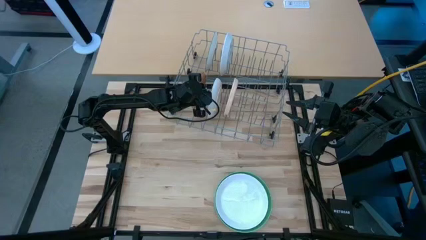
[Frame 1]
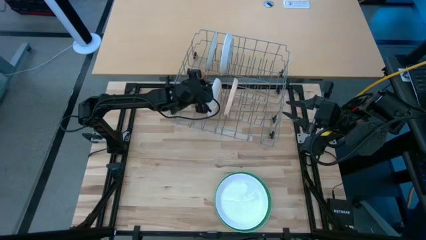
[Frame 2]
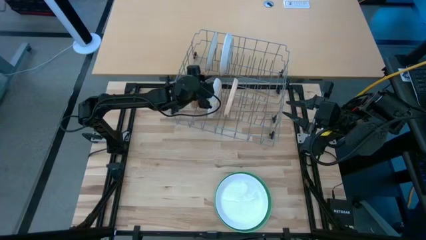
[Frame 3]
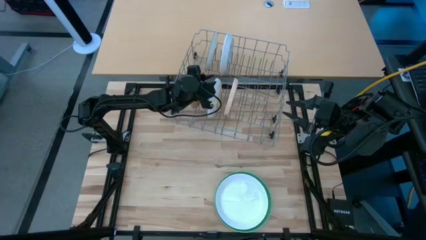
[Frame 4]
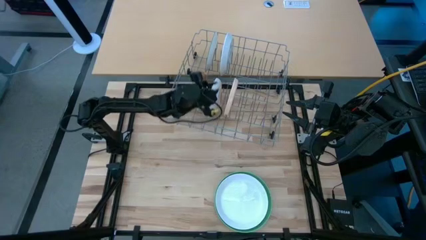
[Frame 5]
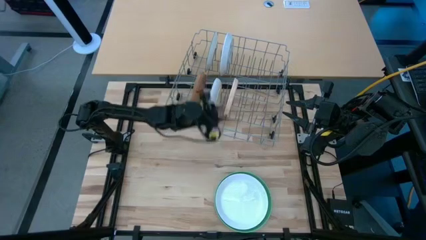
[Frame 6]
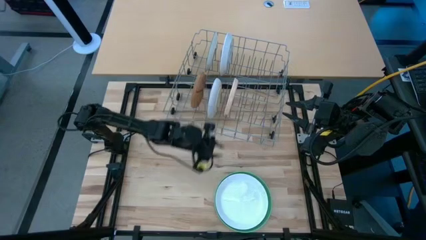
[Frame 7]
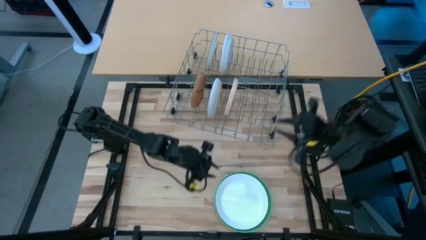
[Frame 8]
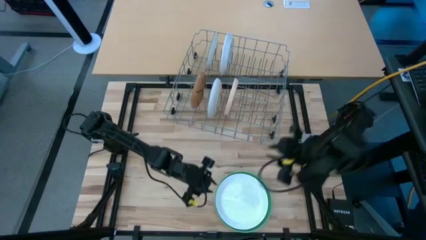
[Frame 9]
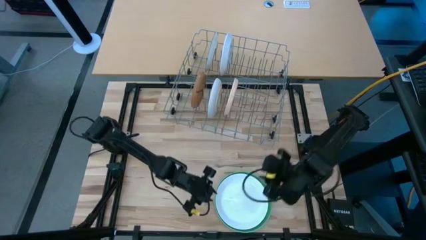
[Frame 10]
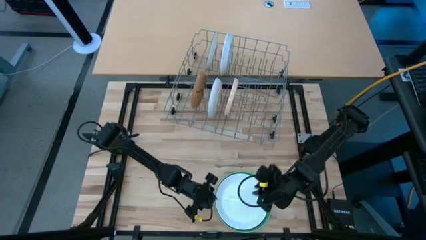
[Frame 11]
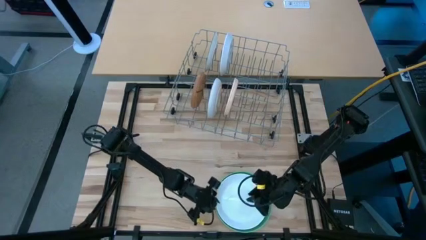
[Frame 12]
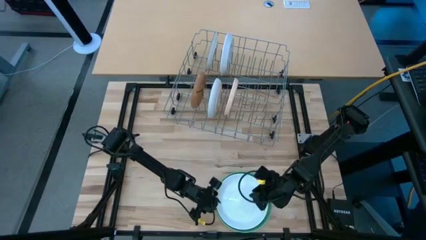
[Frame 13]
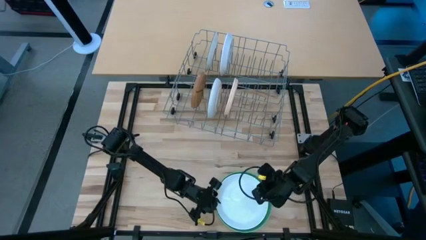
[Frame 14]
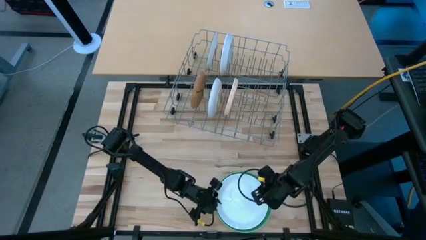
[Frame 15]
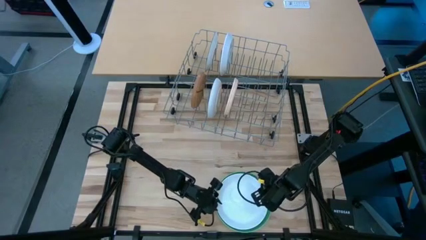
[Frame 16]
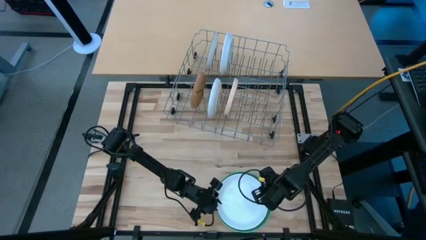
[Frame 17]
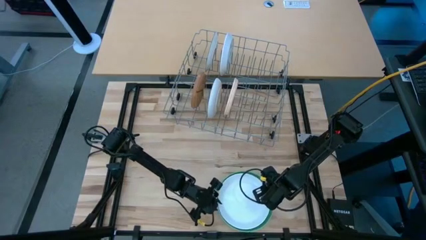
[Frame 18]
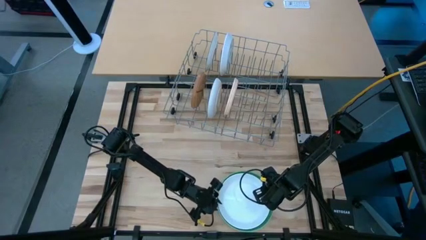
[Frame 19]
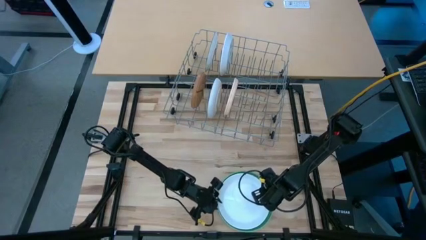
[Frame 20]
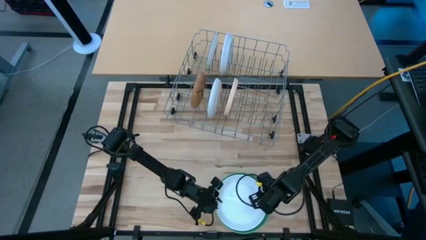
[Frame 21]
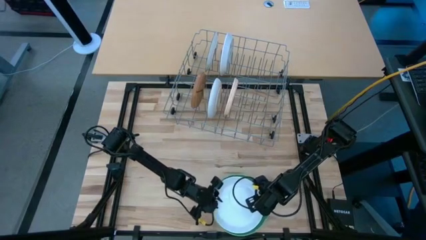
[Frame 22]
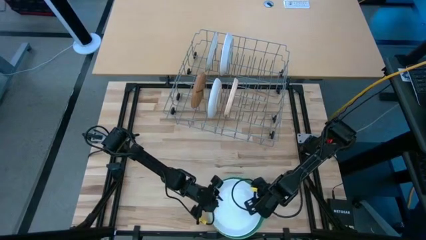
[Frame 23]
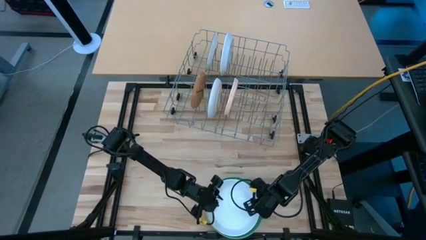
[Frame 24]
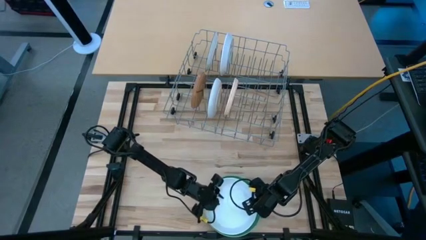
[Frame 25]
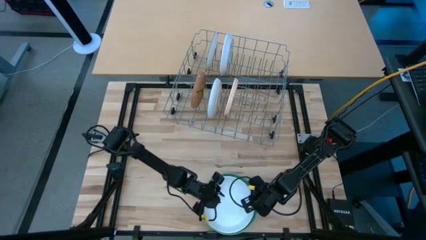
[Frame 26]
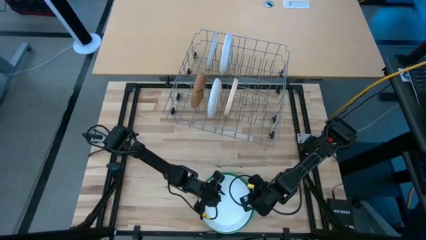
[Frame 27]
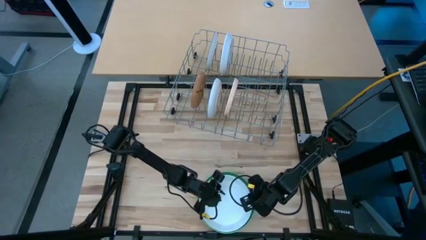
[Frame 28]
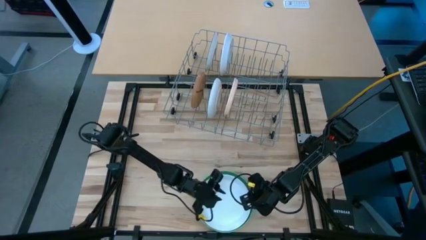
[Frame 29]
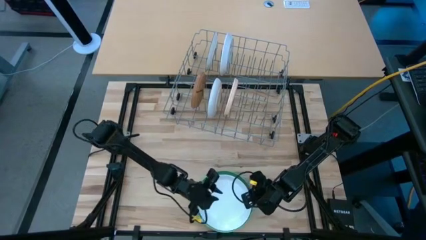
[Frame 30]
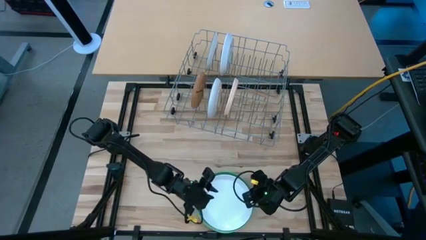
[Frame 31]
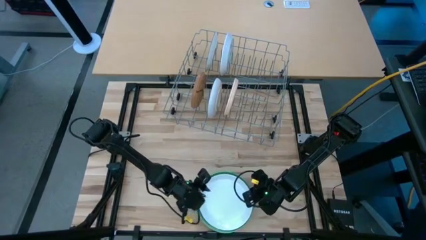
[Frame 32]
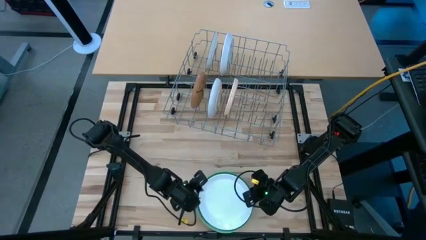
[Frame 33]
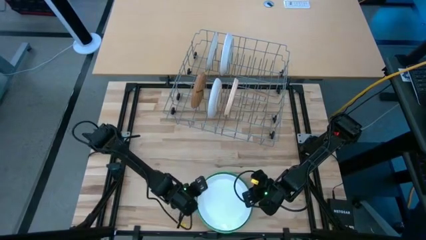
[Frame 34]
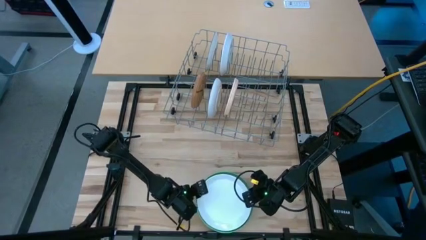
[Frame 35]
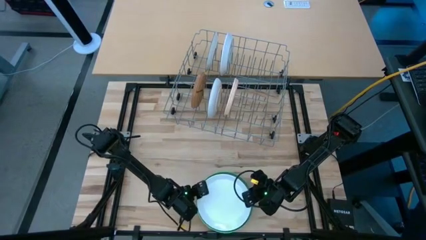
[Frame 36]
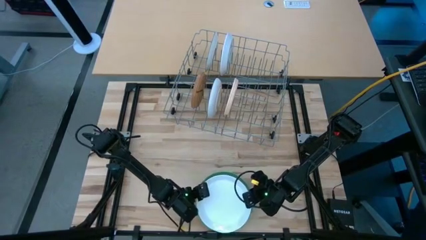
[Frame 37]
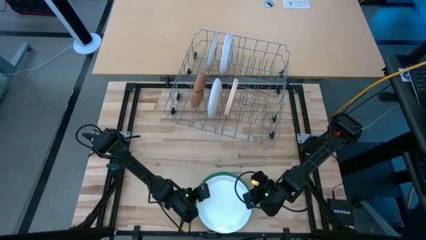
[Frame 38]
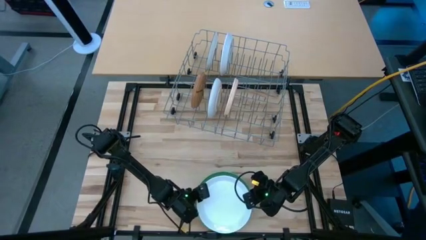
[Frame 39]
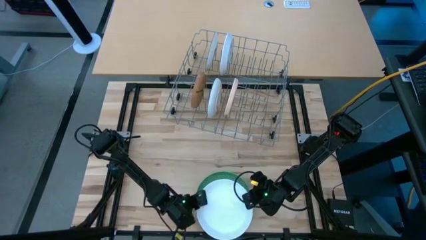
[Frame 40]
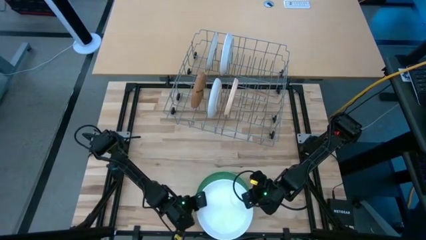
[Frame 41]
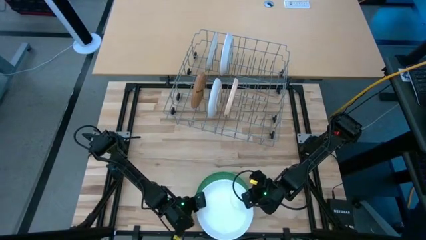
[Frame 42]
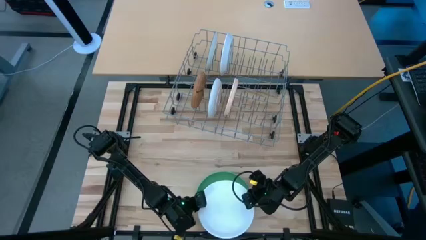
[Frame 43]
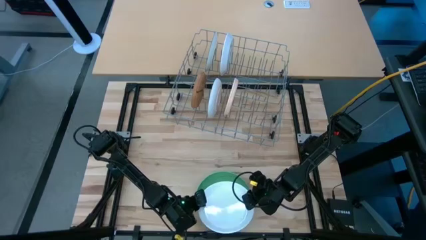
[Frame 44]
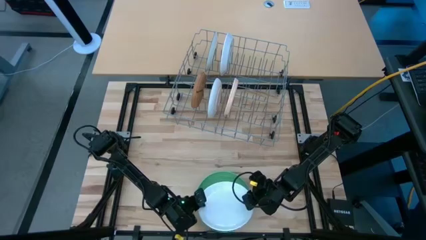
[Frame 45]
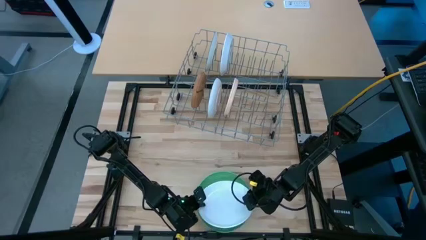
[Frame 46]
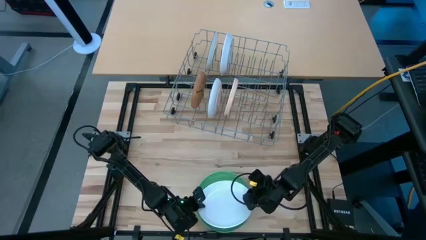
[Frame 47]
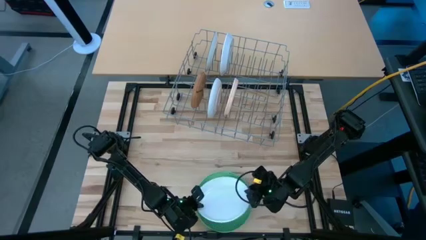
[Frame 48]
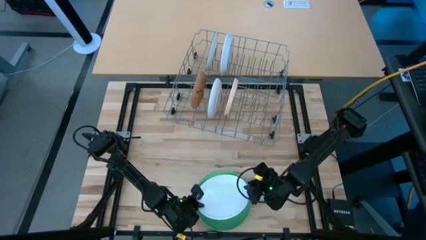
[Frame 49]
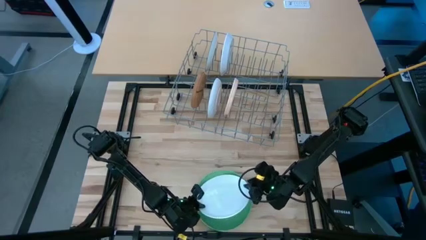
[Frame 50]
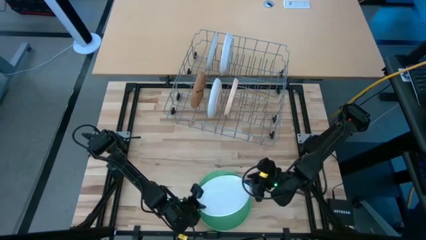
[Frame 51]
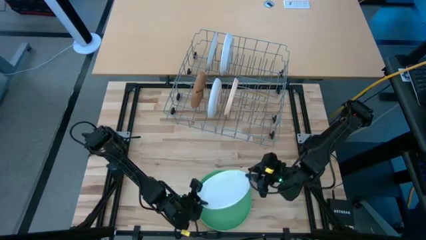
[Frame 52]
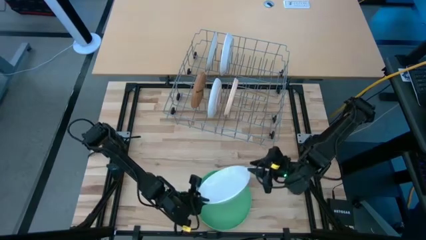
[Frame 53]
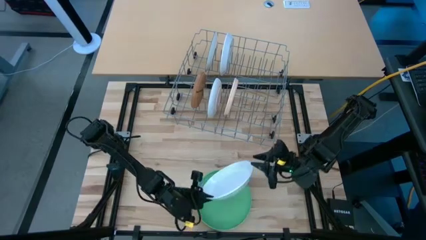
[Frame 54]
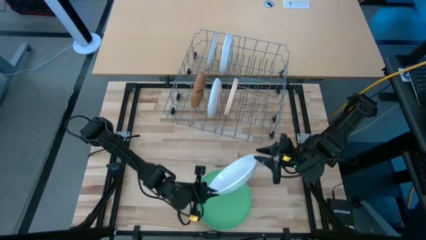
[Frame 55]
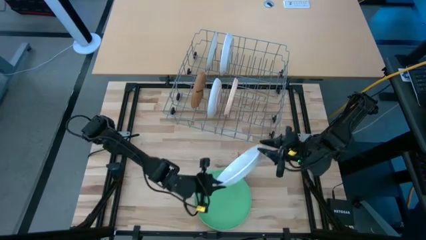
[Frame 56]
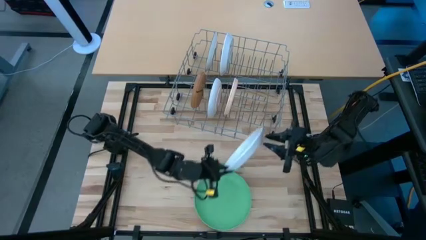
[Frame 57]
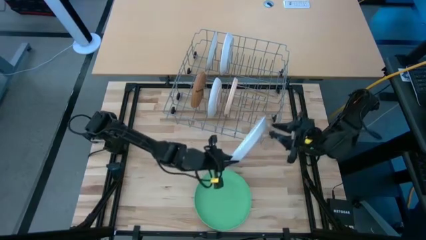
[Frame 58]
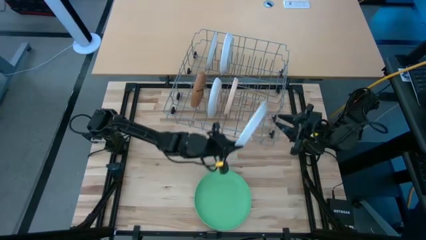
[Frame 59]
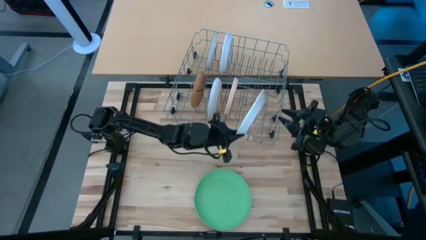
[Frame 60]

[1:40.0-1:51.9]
Task: Sort dishes
Put the white plate into the gray dishwasher rack

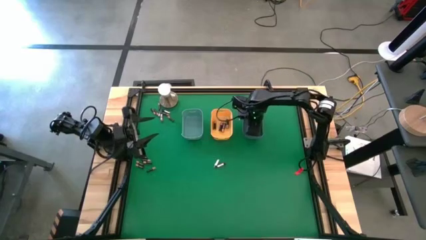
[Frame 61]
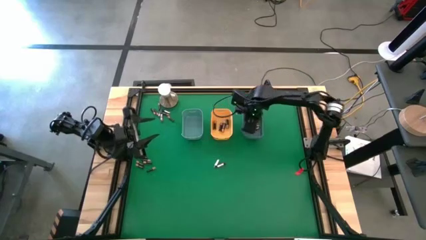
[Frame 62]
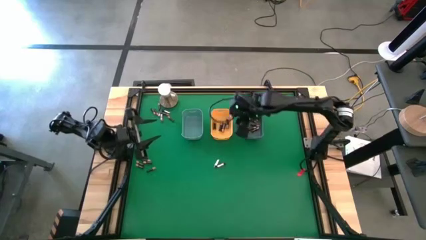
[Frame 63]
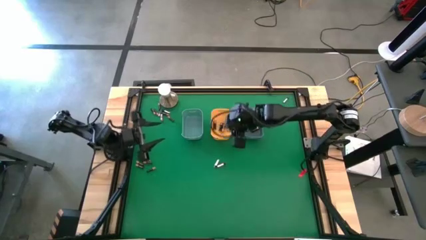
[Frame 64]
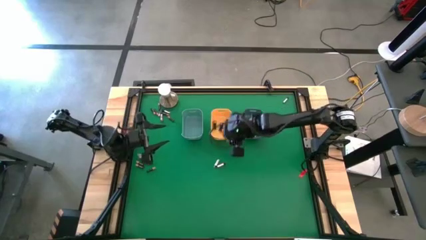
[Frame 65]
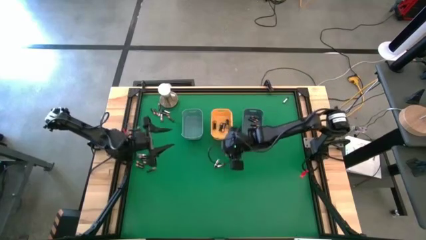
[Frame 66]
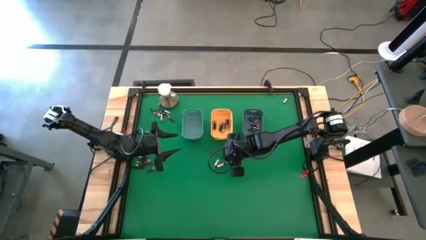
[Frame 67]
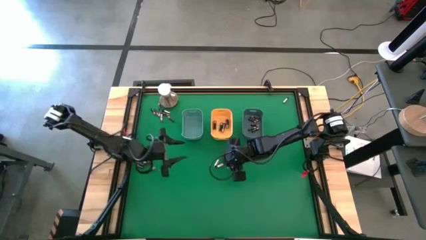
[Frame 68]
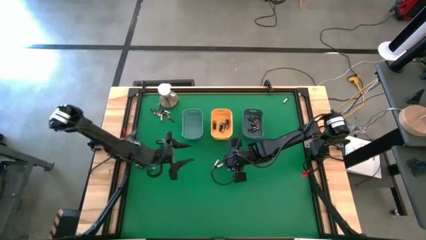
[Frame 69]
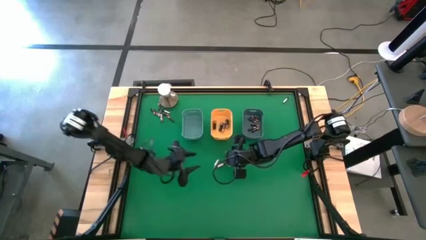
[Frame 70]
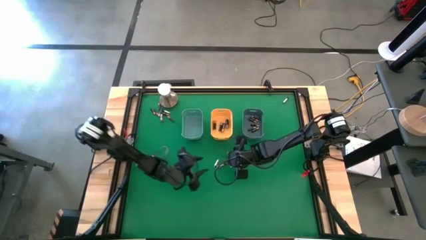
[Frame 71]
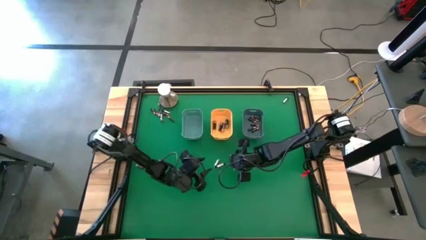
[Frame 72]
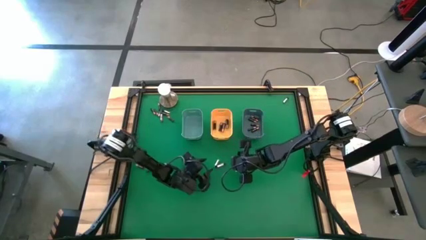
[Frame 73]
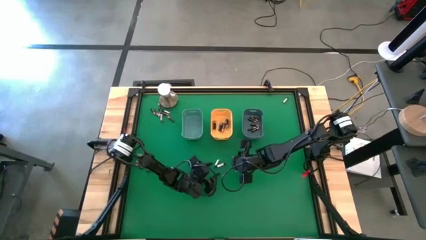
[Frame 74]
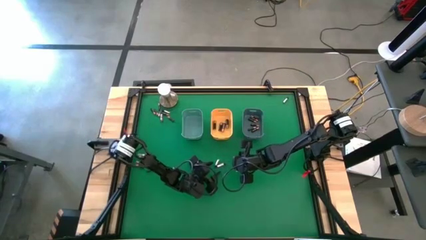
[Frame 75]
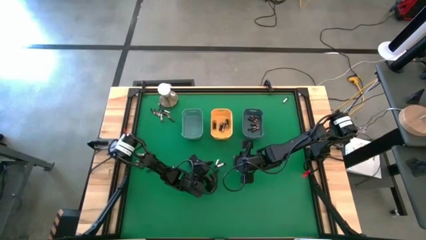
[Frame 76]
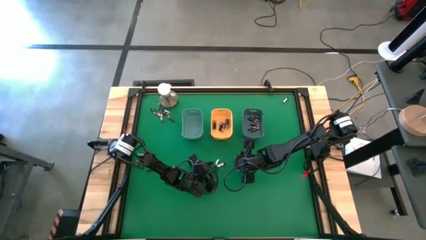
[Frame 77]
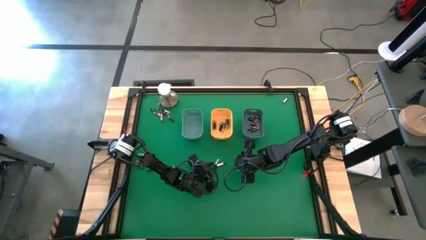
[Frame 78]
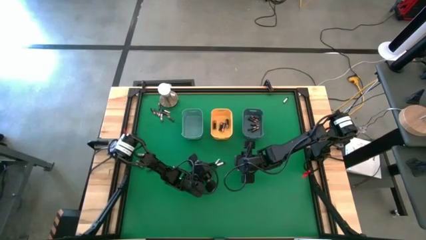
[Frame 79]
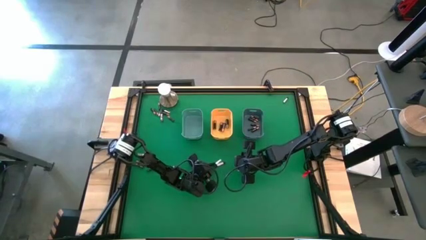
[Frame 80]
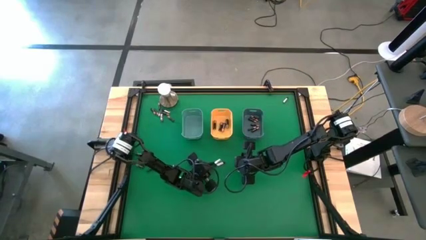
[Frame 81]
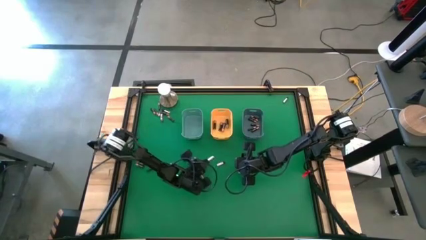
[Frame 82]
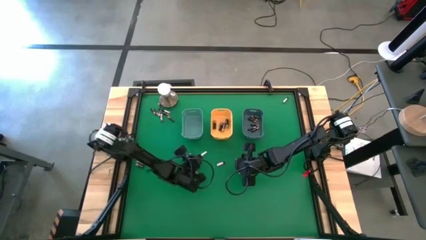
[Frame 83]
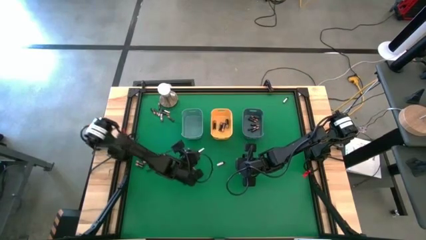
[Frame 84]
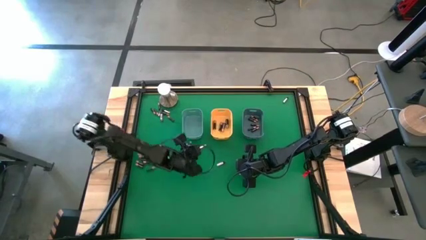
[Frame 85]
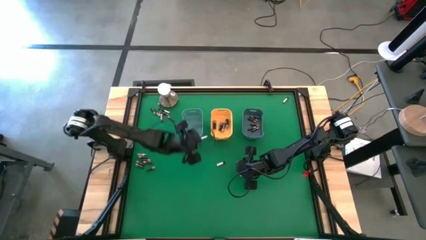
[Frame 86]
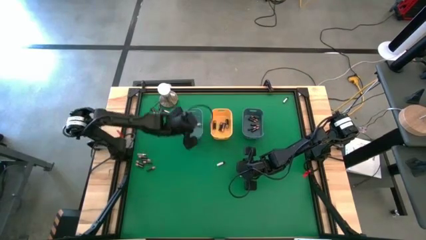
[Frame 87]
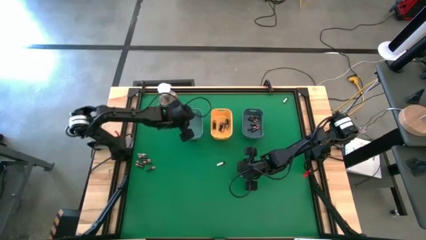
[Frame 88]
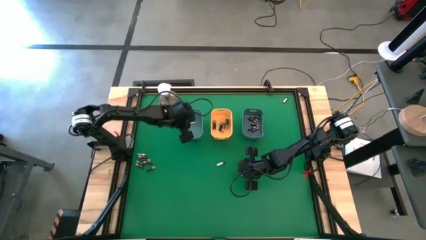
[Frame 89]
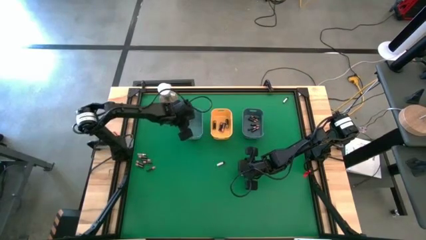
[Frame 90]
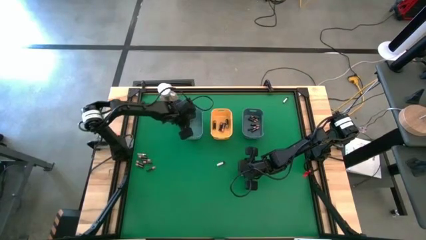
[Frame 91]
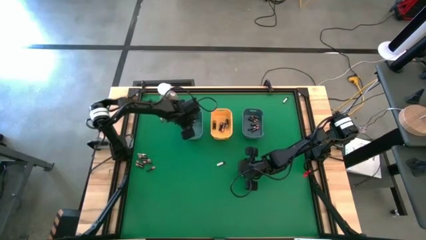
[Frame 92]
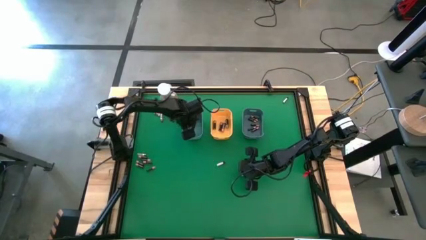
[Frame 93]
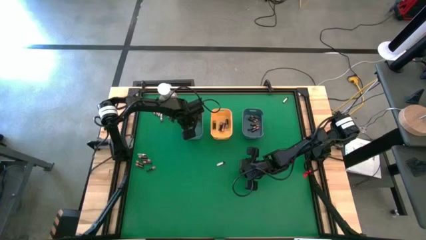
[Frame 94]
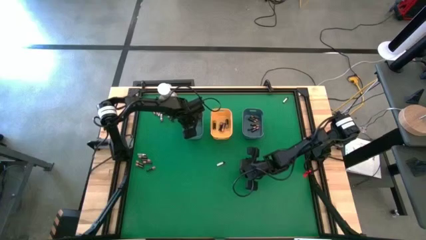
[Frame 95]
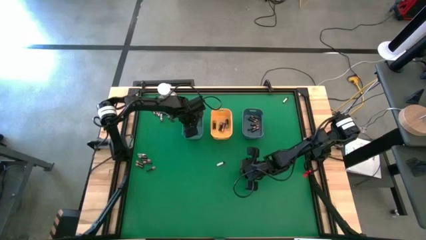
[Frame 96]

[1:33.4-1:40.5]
Task: Sort batteries
Put the silver battery into the green bin
